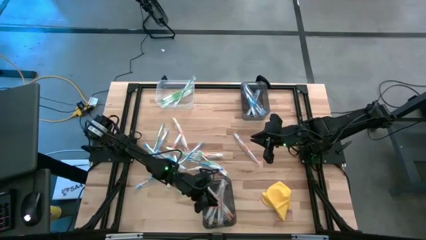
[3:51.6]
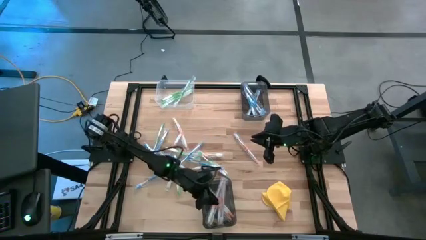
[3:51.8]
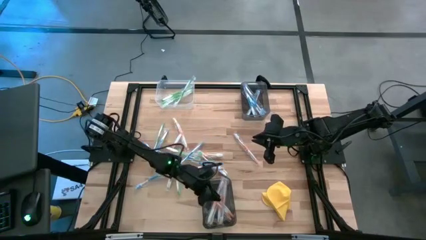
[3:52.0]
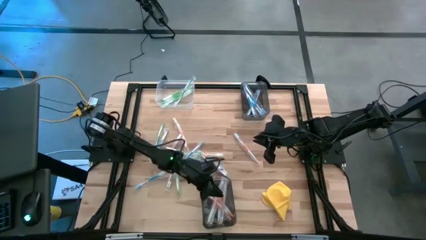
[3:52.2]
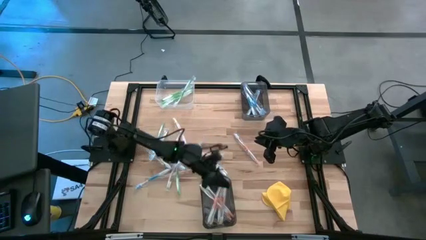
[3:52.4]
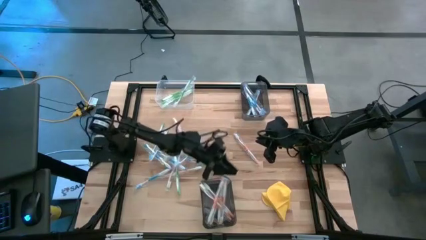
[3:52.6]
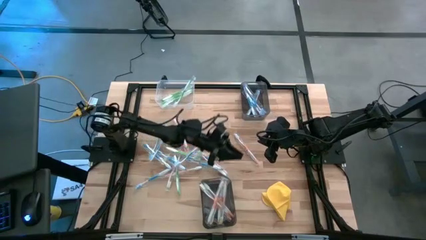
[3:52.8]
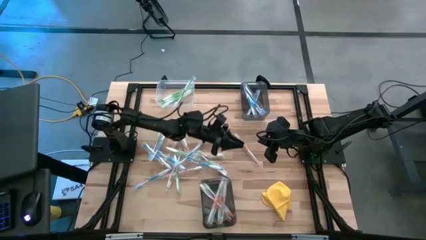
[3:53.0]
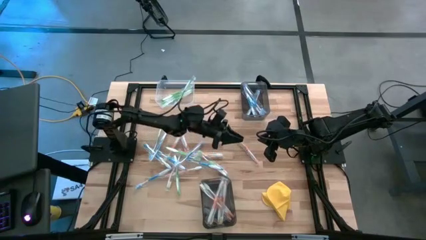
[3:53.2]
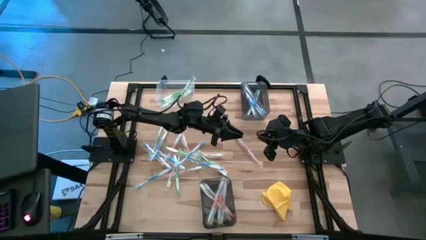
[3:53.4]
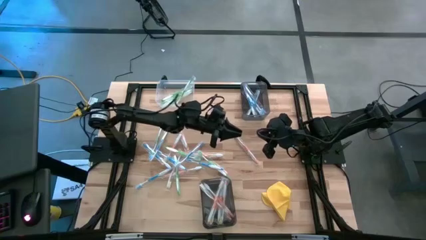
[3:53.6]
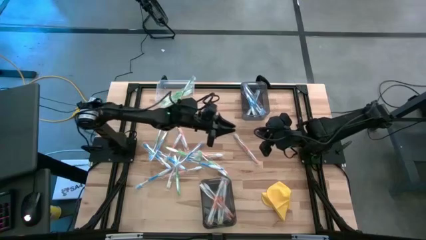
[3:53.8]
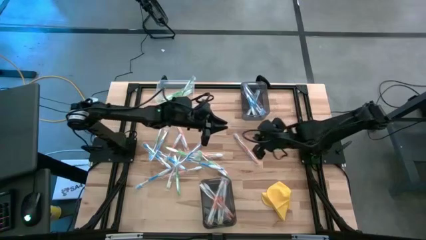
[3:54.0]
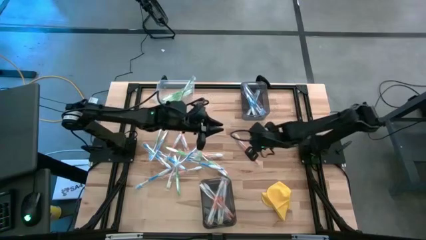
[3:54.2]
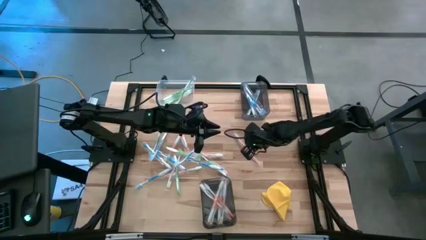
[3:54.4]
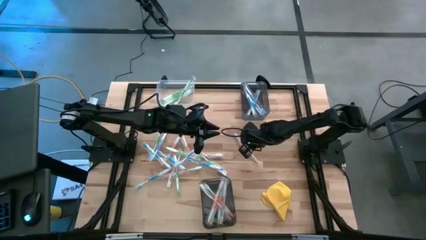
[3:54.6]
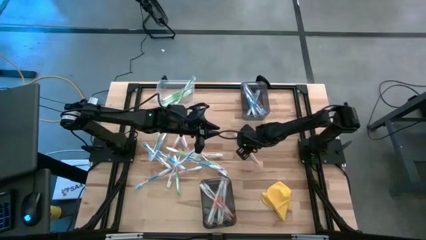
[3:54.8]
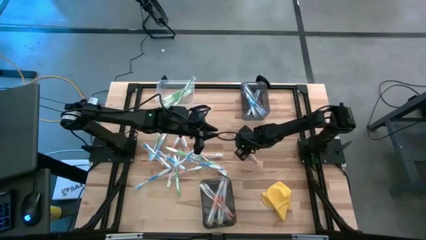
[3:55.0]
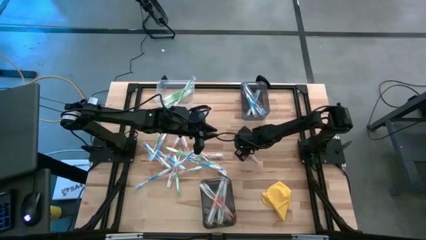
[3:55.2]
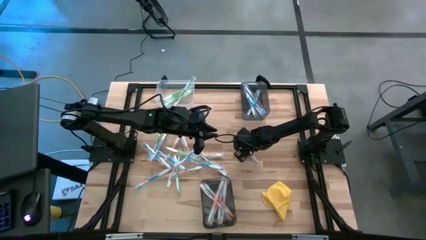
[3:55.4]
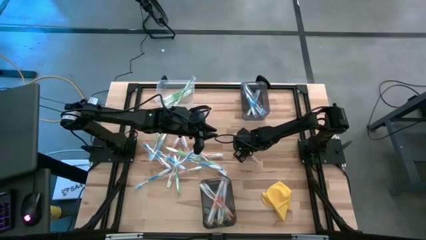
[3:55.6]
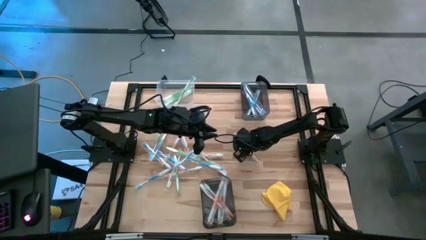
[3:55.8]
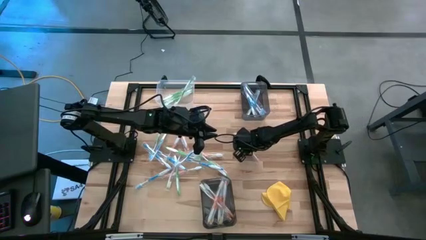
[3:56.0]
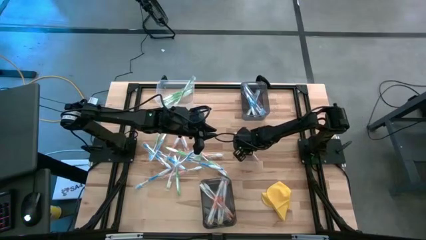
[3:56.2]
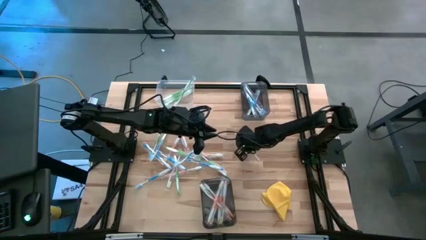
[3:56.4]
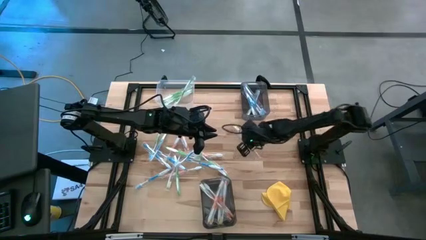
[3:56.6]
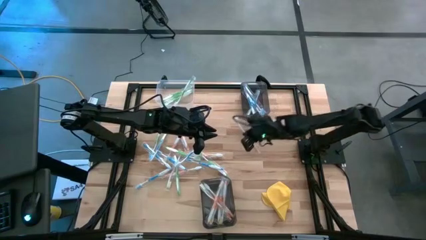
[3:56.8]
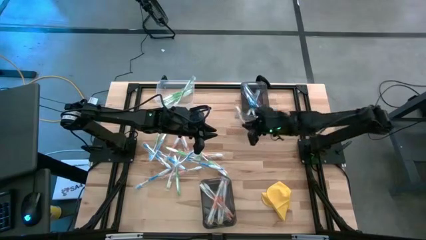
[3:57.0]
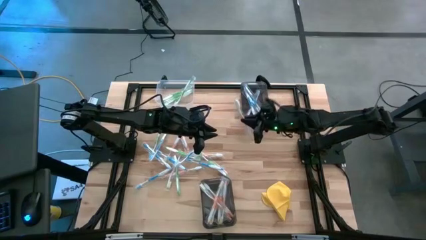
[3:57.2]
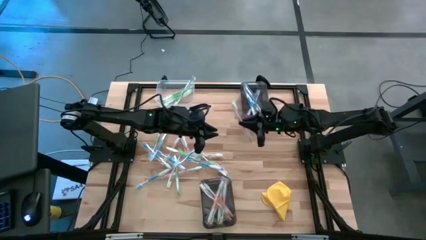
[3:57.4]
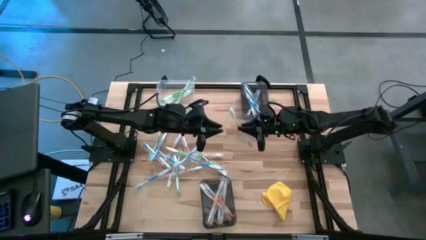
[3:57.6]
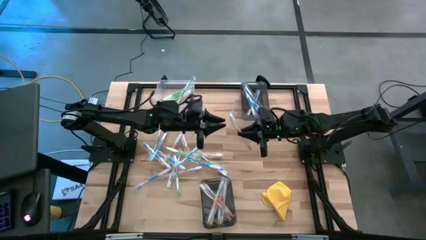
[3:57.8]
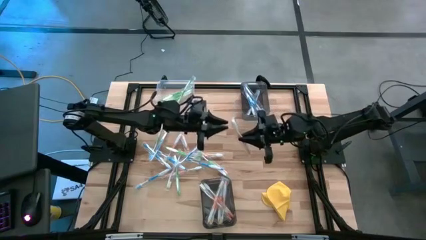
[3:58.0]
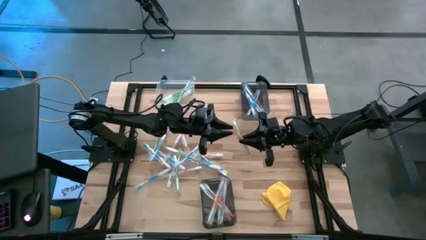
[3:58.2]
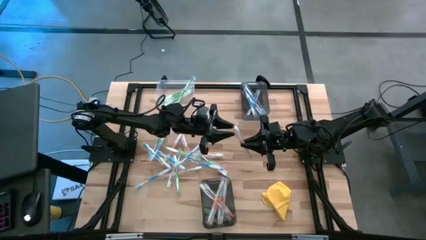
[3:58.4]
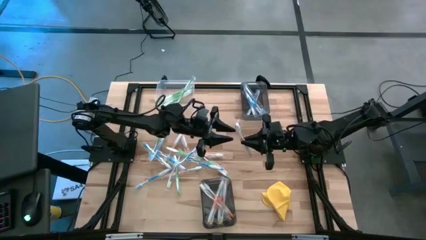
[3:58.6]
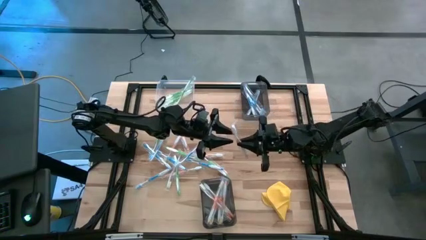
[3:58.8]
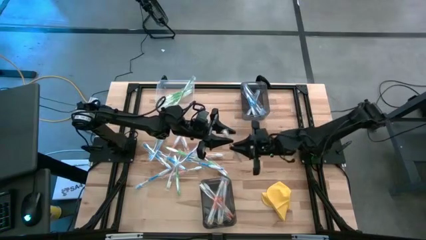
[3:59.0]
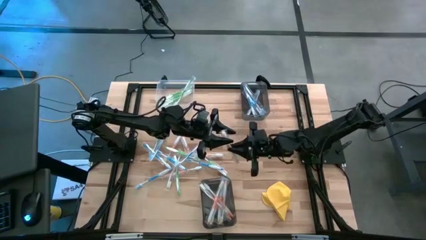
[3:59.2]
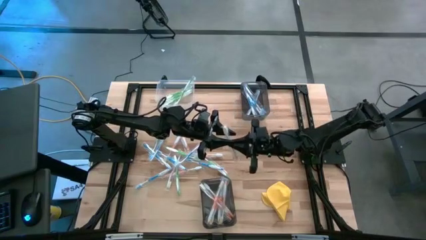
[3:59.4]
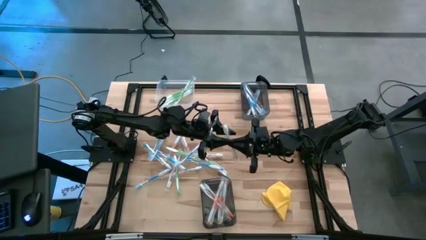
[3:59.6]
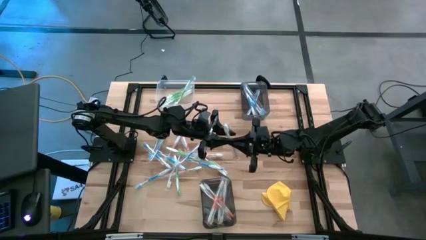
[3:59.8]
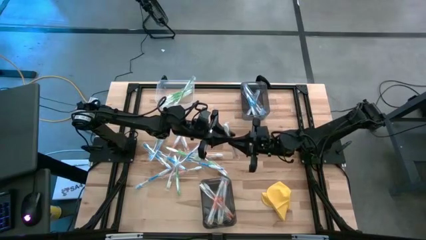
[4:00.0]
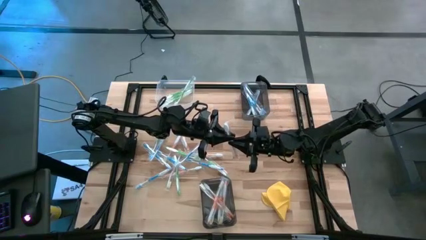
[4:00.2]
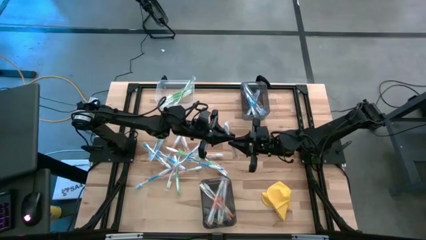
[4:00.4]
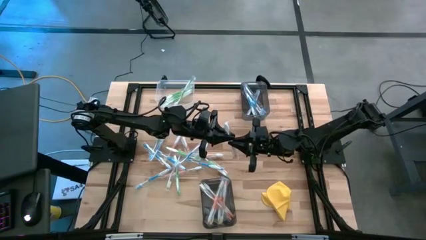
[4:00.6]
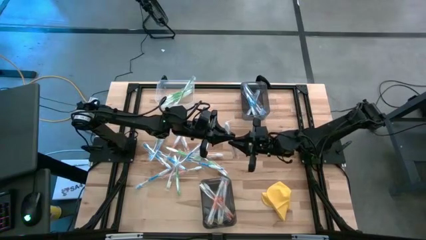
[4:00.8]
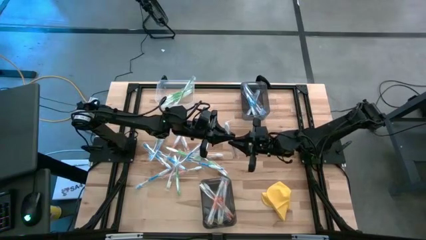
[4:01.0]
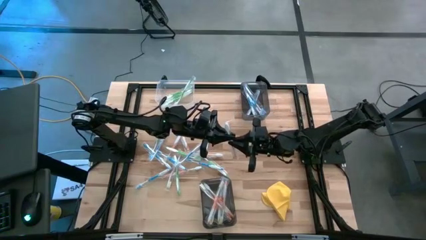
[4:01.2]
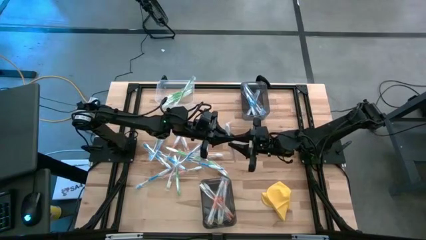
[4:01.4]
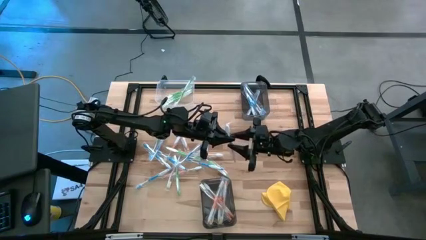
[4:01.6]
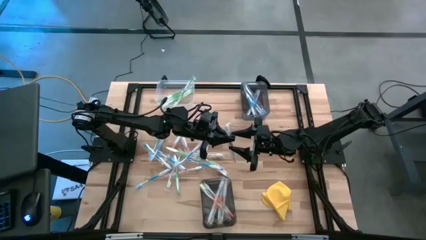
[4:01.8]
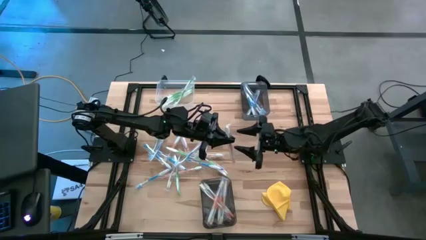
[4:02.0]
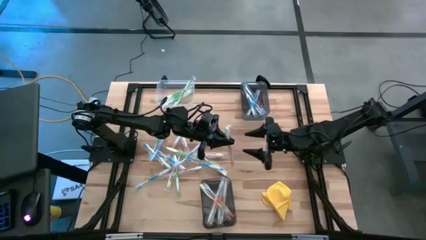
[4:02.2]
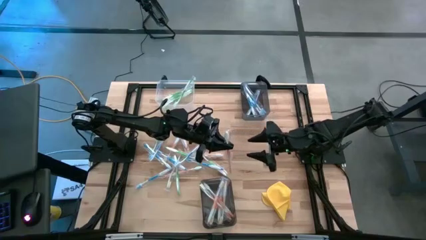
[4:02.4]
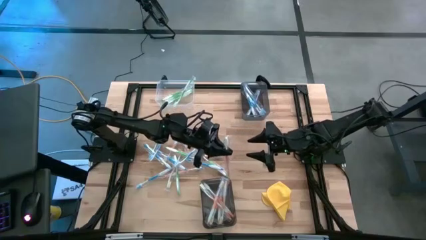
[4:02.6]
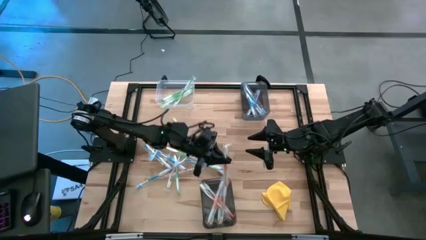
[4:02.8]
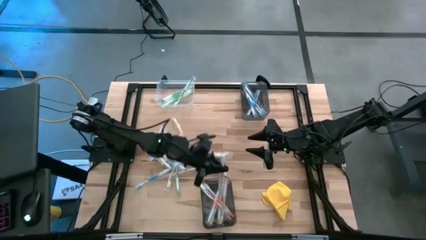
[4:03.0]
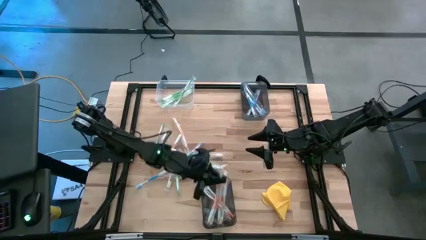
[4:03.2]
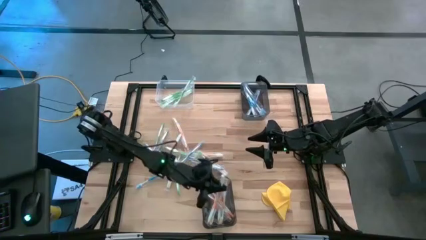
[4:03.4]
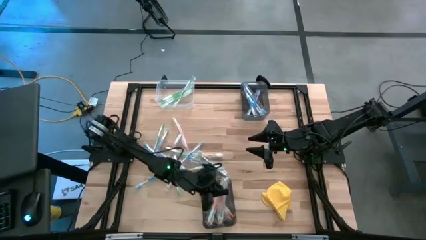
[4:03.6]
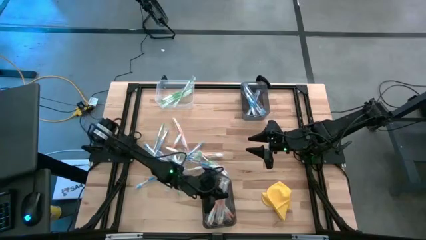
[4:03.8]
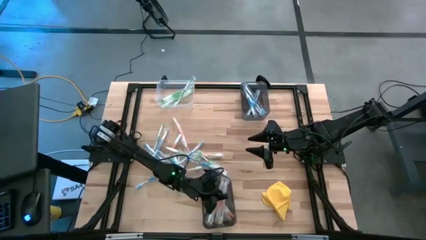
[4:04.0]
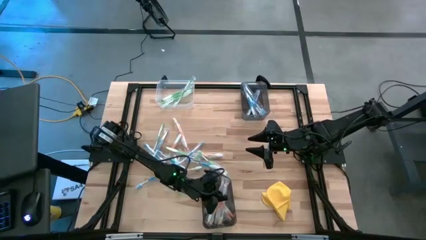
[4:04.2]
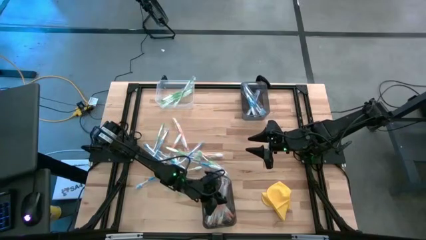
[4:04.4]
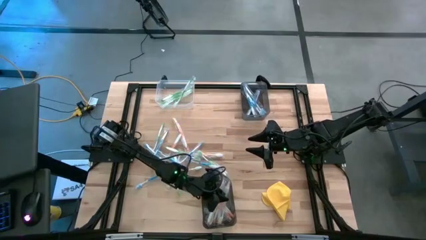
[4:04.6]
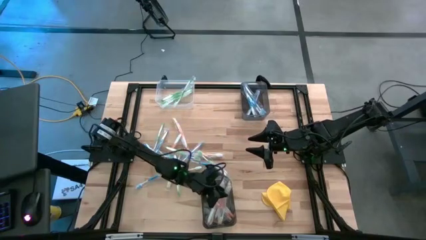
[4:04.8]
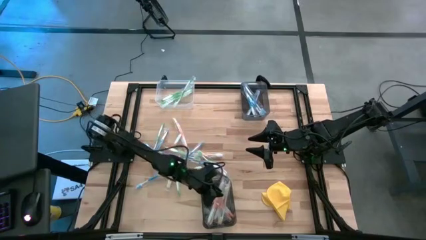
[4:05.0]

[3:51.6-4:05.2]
Task: Pick & Place Toothbrushes
Put the orange toothbrush into the bottom black bin

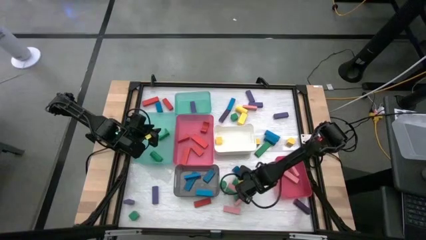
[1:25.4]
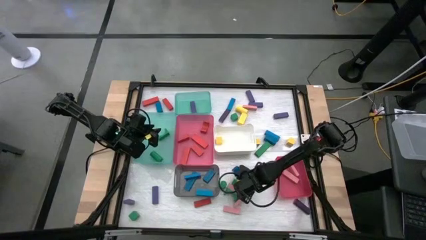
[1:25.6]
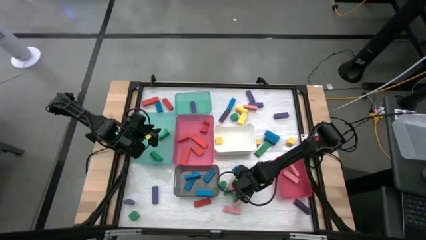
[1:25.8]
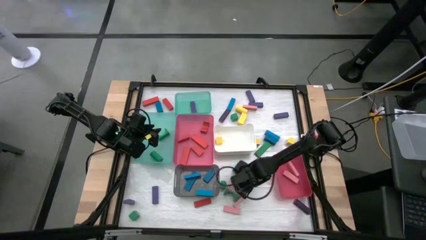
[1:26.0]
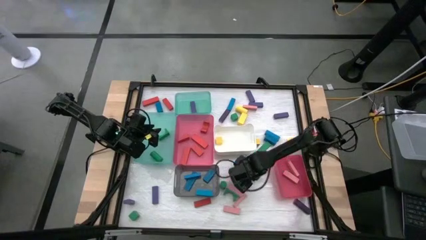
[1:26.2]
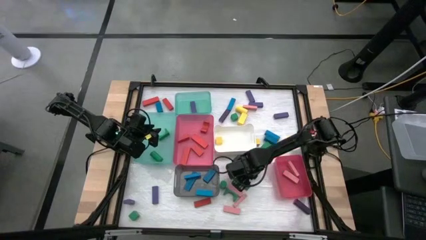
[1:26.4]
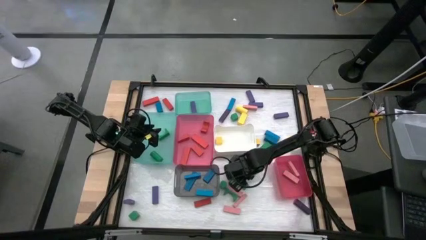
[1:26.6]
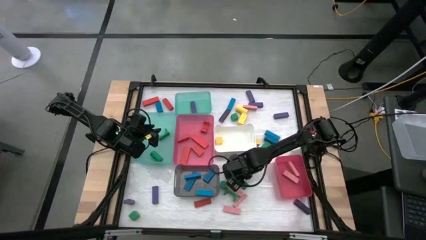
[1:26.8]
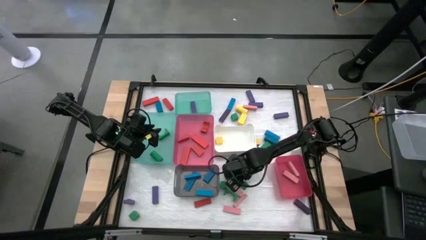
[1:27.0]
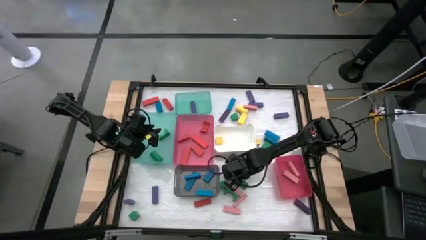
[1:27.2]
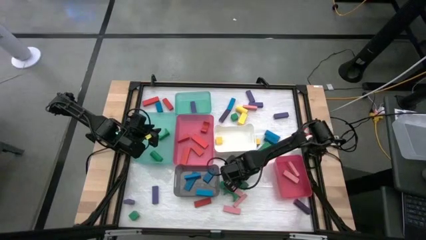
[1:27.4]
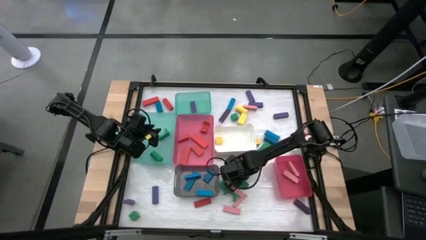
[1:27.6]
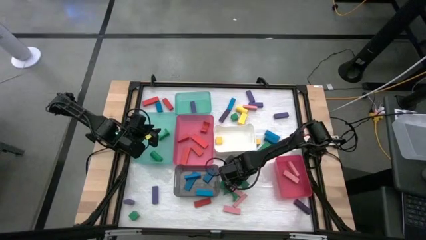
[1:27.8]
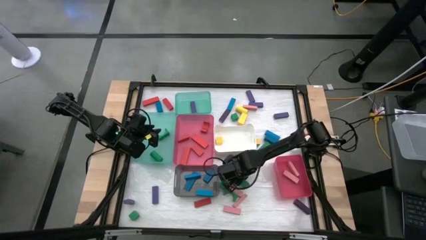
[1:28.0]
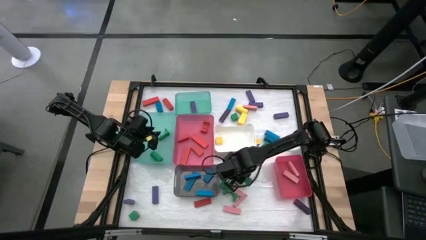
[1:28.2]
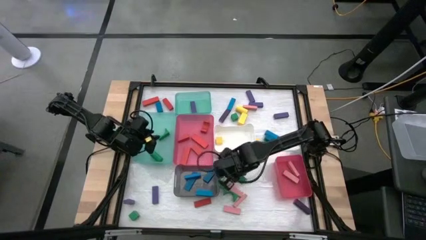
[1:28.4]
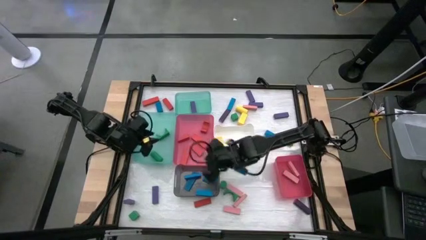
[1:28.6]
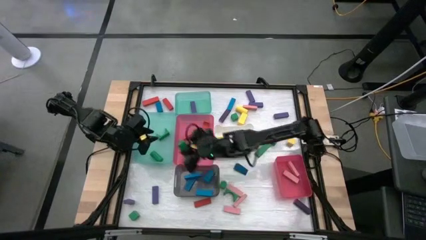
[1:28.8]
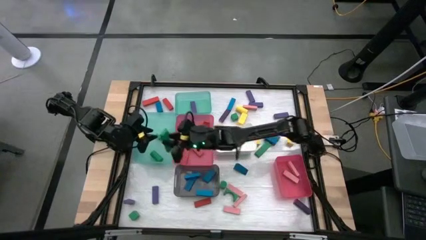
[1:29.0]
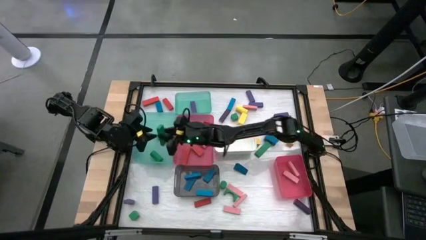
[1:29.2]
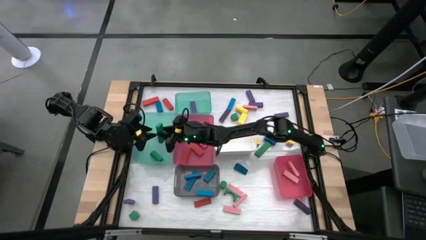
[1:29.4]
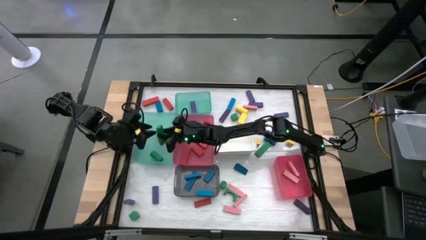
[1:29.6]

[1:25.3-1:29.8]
Task: Sort blocks
Put the green block into the bottom green bin
